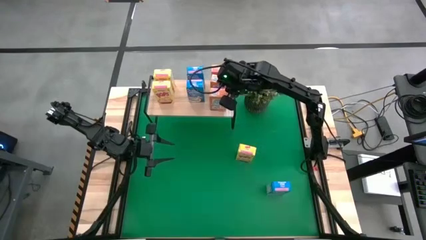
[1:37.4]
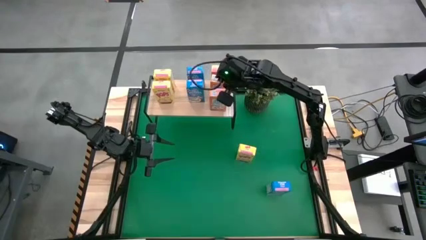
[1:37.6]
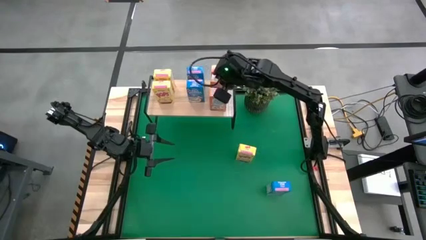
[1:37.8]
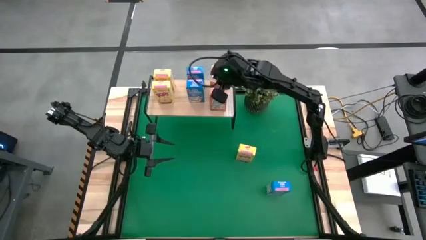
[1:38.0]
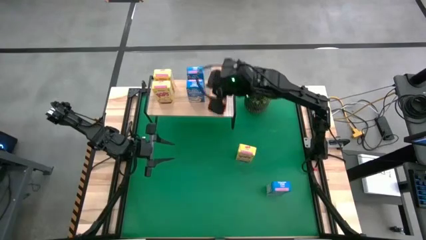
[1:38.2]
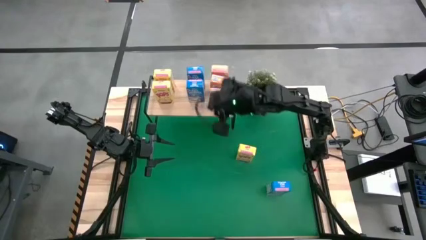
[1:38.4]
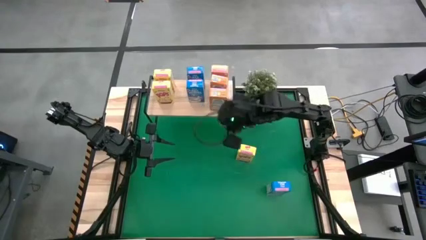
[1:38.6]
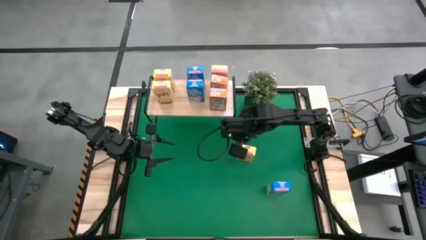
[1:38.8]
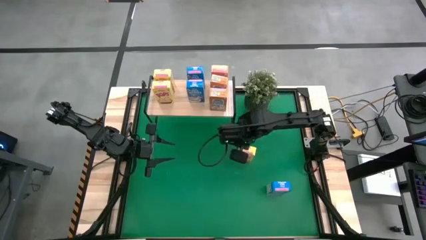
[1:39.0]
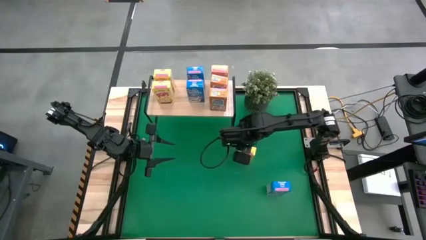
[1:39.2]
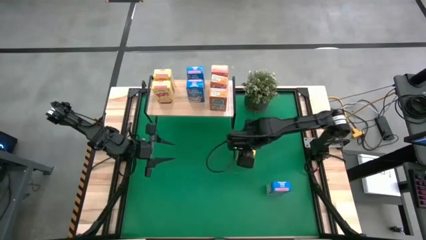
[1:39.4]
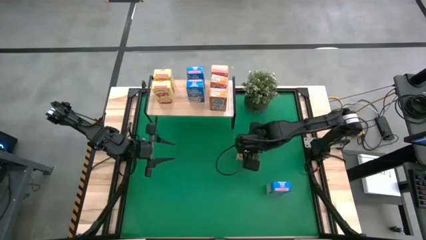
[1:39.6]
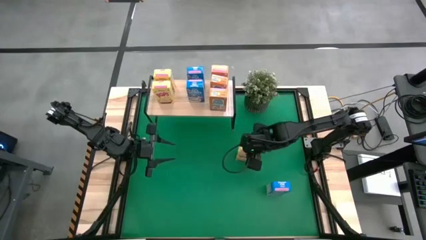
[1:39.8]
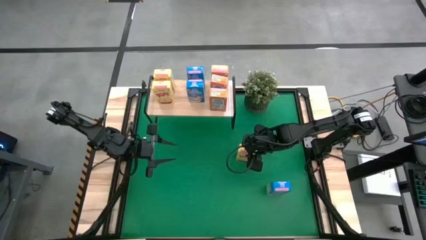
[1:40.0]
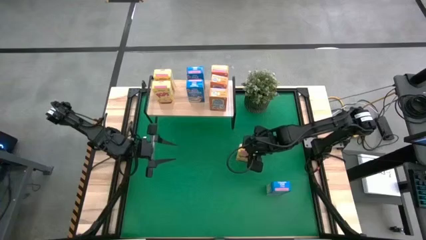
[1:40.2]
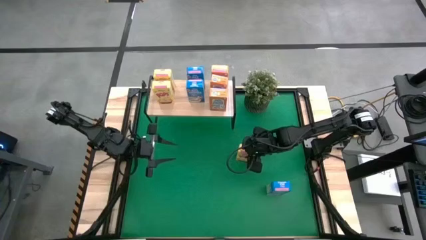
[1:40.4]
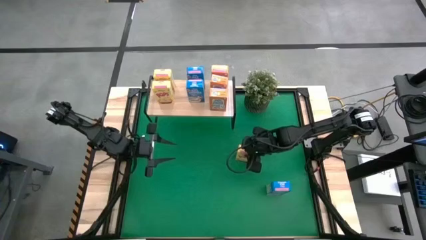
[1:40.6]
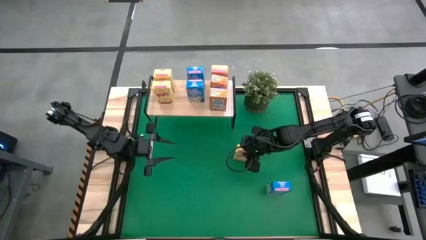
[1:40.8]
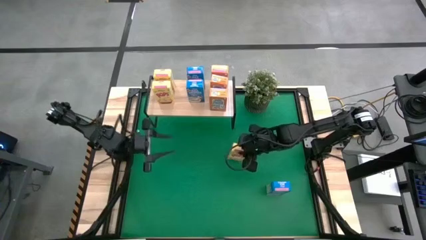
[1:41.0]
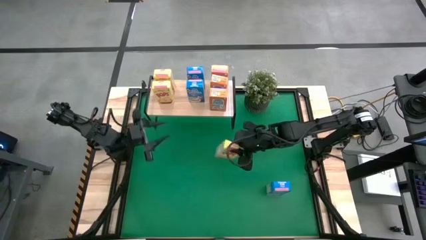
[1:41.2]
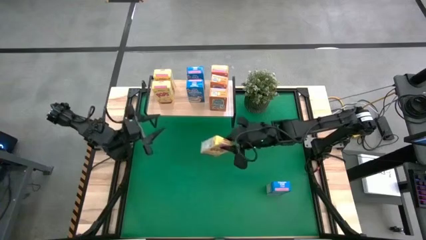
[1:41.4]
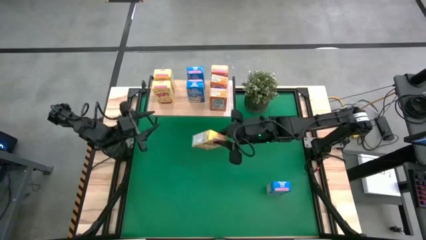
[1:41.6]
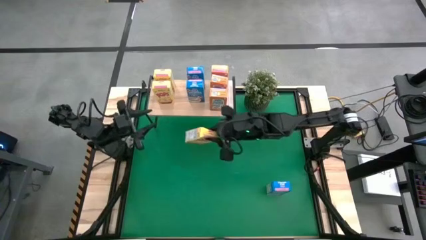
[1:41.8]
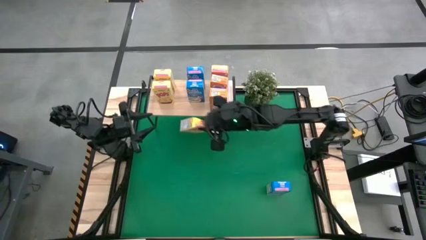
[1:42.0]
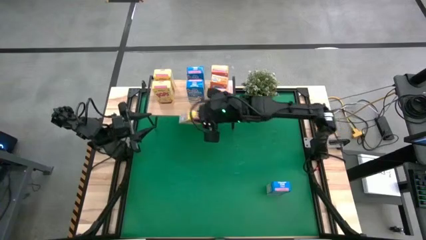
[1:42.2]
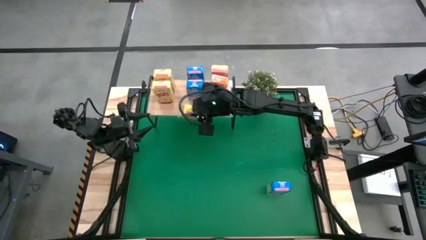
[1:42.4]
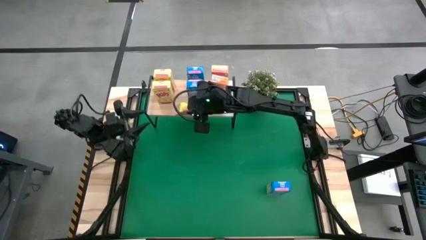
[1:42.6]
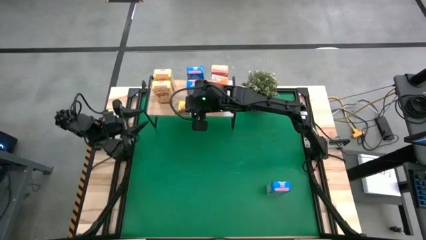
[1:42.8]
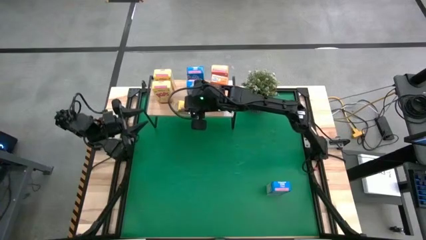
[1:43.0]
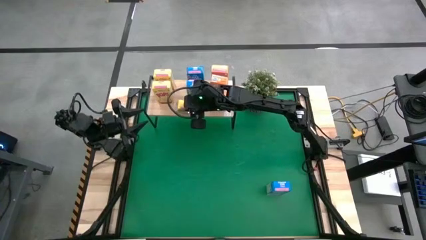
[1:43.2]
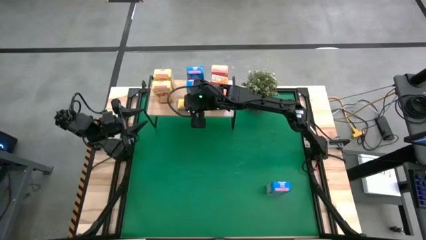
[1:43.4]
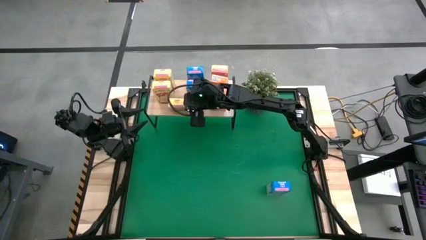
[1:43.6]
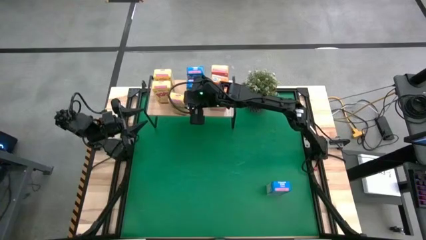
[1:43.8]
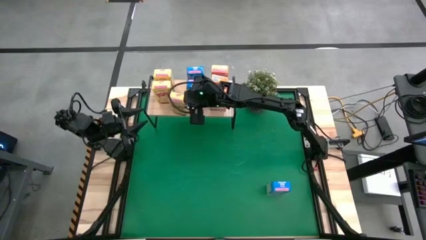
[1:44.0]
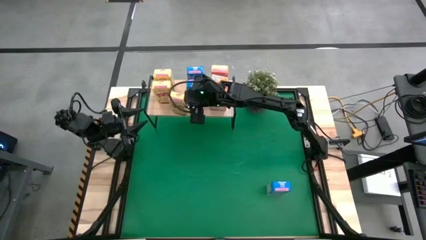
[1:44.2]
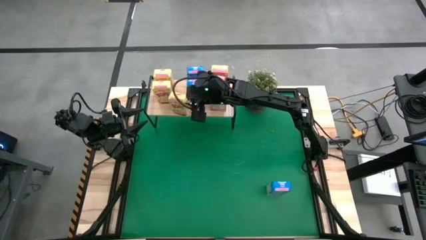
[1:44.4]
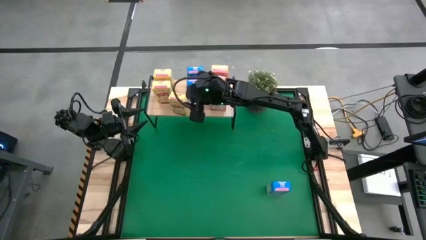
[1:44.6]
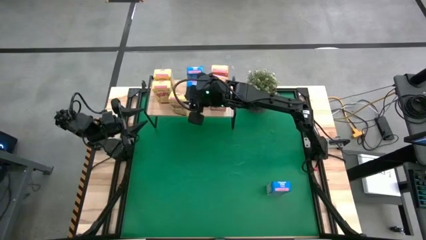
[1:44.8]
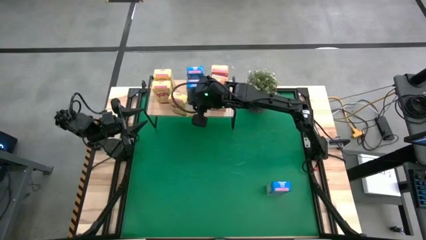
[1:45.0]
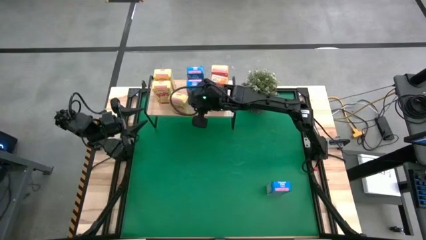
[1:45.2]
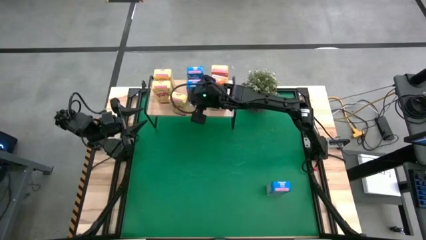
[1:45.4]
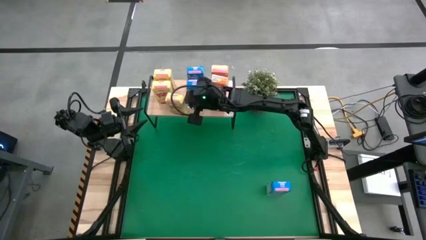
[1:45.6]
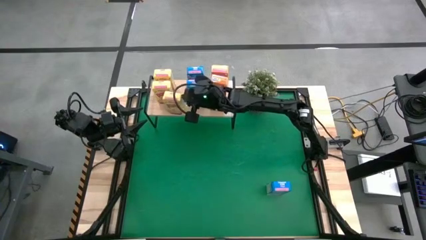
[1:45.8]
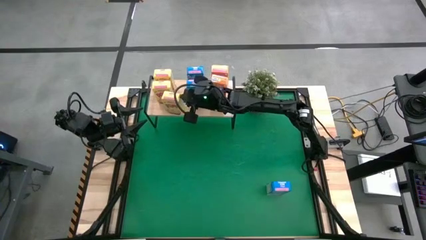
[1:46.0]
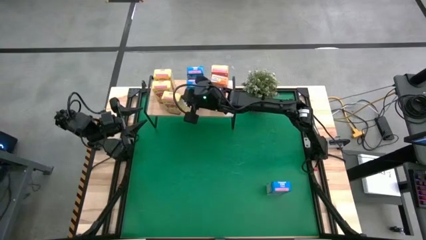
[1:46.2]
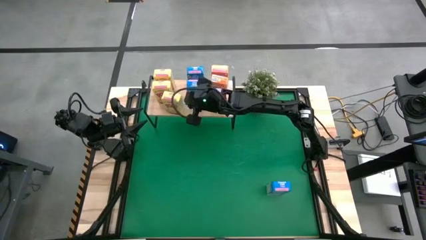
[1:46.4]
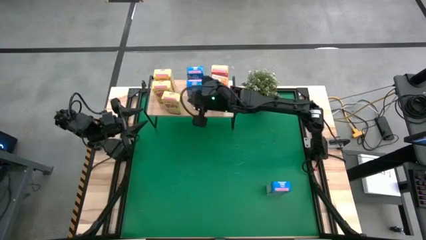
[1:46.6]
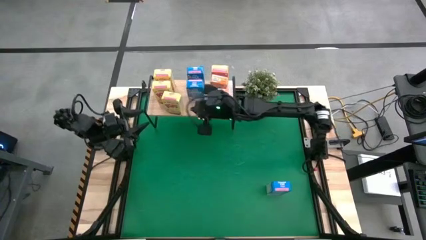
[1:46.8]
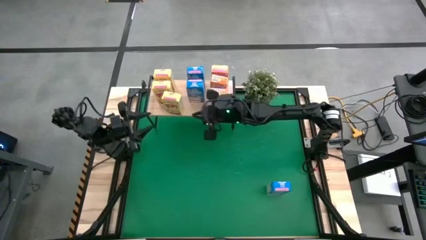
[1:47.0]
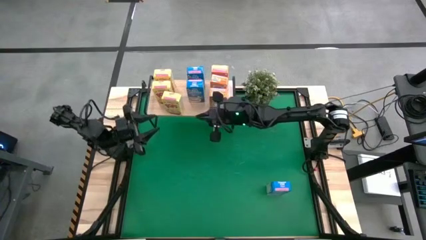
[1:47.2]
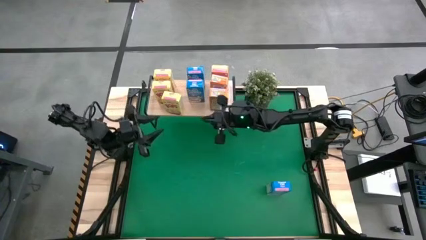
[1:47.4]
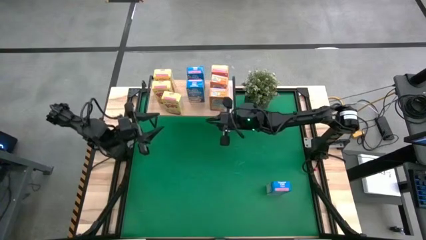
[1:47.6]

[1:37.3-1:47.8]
Task: Stack cereal on shelf
Put the yellow cereal box on the shelf

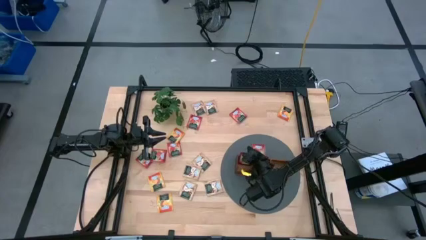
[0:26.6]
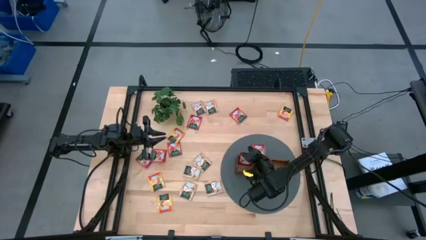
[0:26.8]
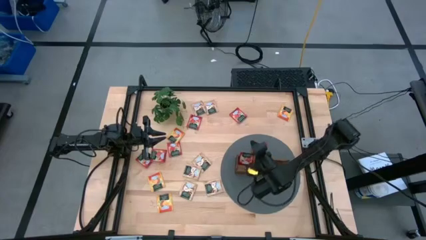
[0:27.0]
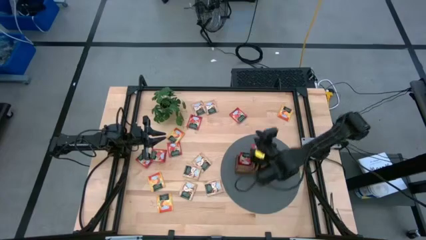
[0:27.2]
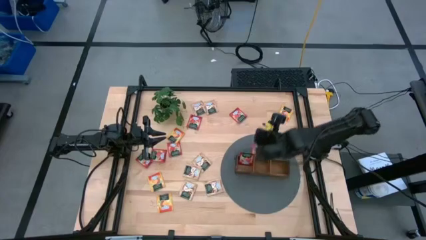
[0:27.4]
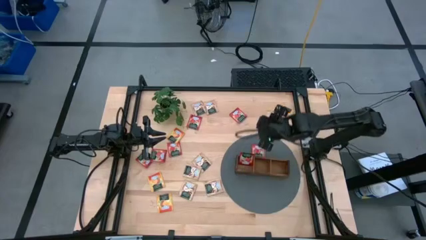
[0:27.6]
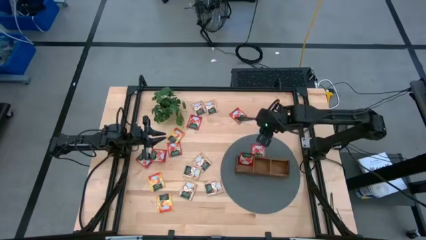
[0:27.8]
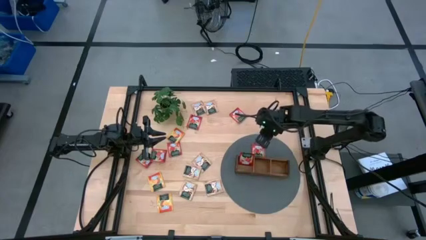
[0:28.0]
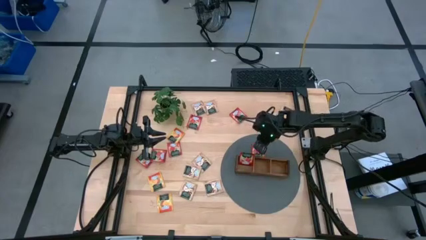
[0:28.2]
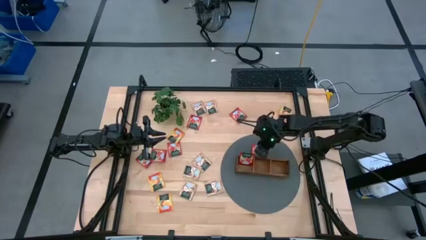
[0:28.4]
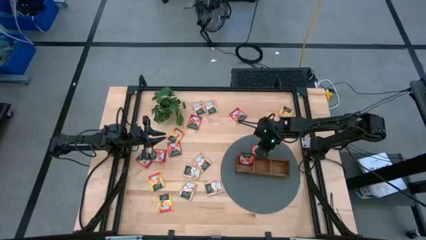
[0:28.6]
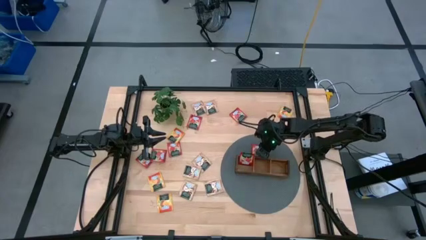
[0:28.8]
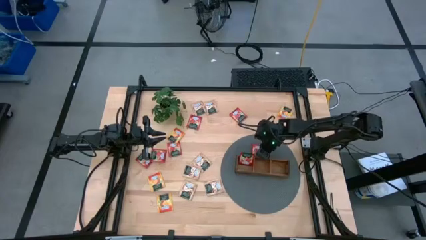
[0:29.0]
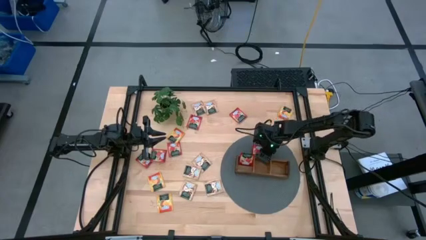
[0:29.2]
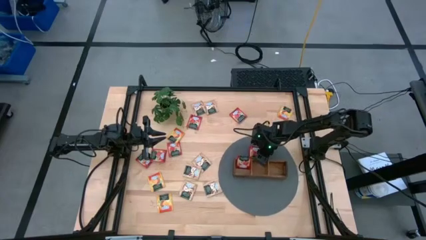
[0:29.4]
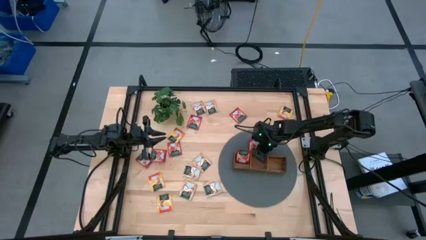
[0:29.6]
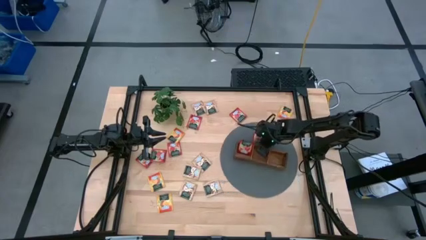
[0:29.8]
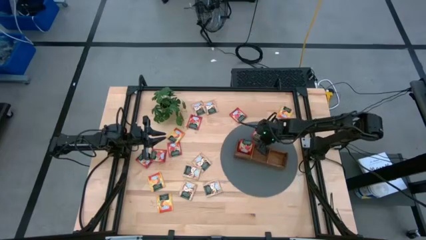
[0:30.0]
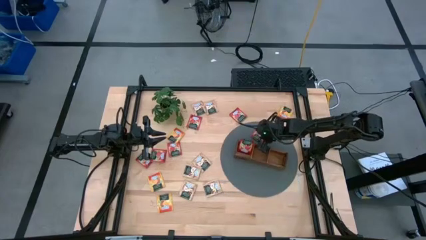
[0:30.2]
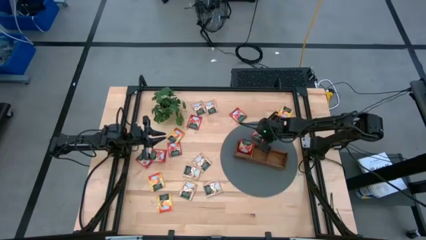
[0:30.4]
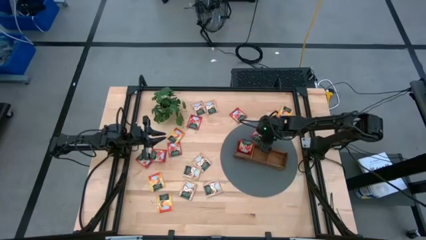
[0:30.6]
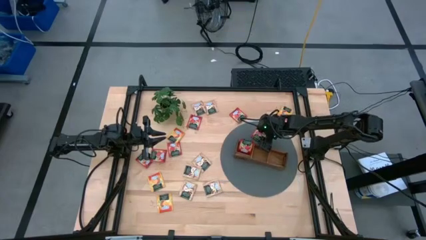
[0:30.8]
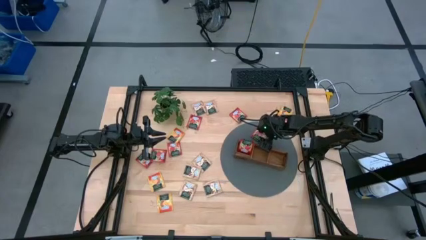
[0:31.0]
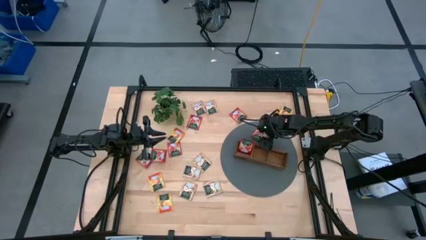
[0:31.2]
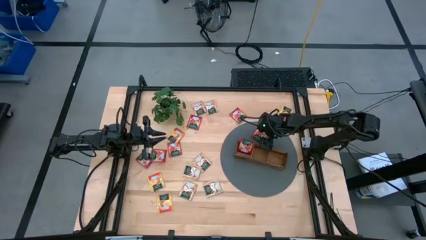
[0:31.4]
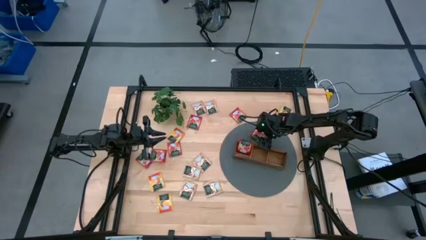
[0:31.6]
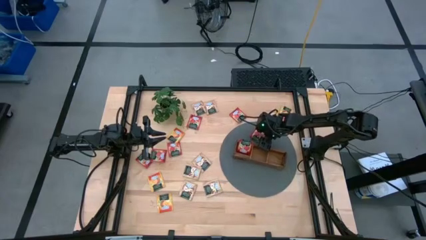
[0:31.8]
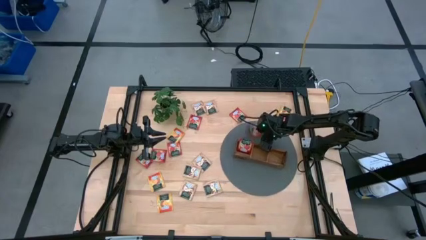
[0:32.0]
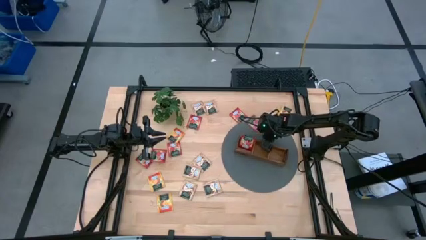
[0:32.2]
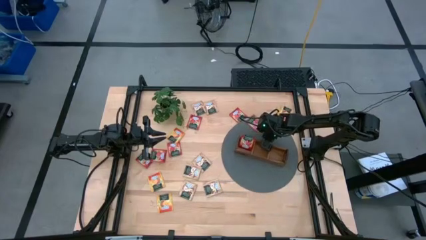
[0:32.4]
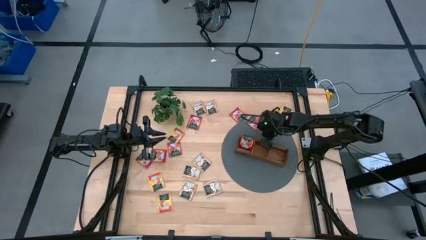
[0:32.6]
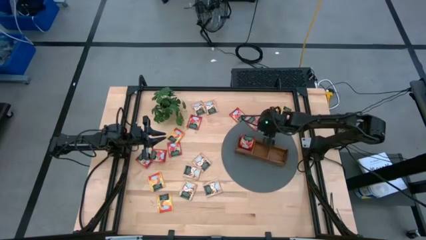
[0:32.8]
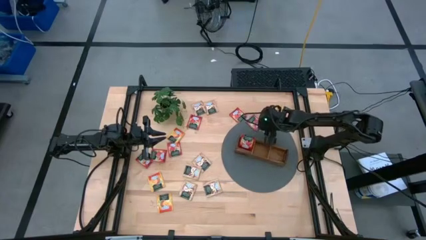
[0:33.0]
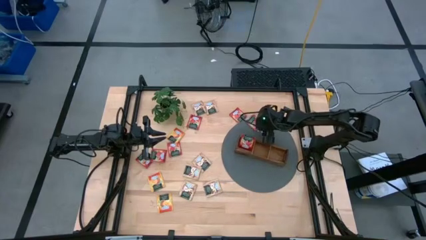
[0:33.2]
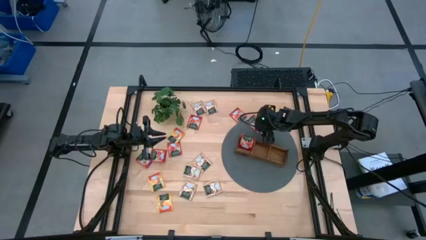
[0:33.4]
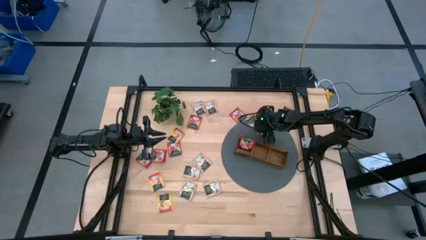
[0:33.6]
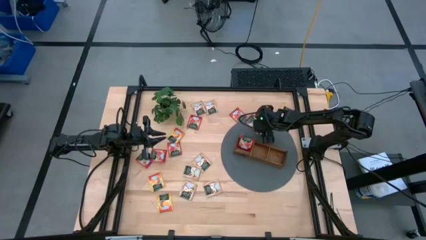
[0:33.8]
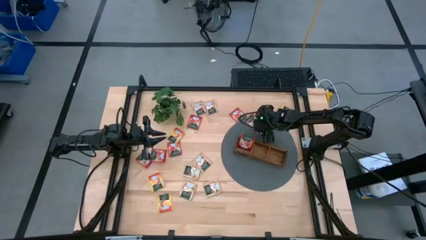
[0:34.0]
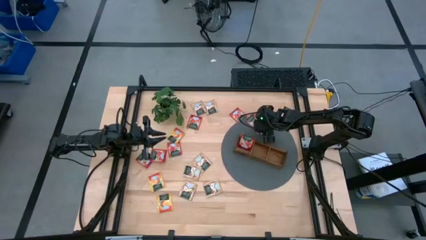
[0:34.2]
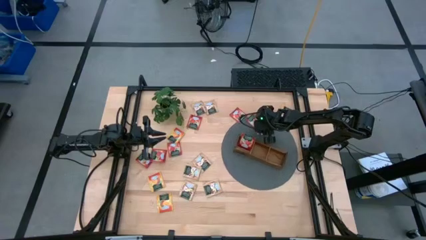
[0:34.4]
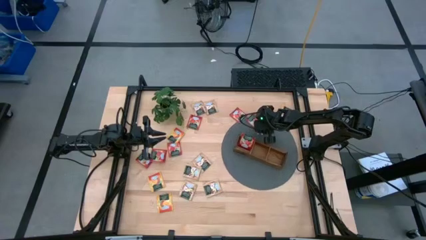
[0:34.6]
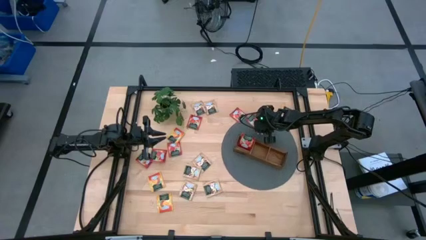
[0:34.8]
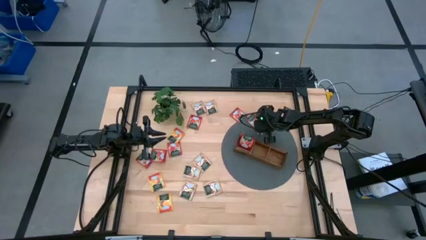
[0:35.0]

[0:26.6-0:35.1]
Task: Pick & Place Tea
Put the red tea bag into the left section of the wooden organizer
